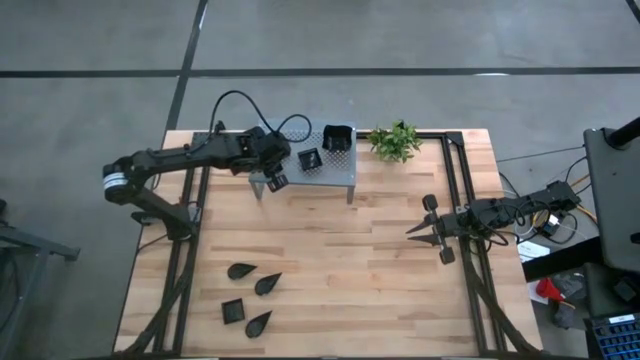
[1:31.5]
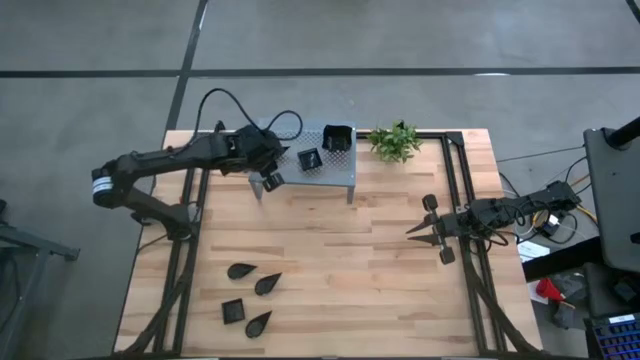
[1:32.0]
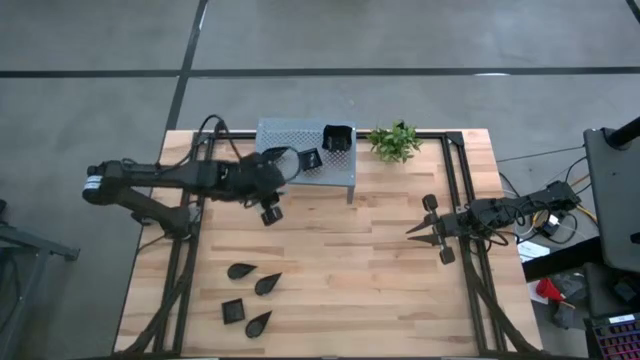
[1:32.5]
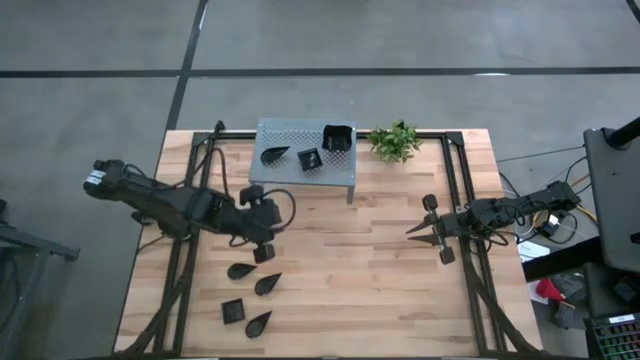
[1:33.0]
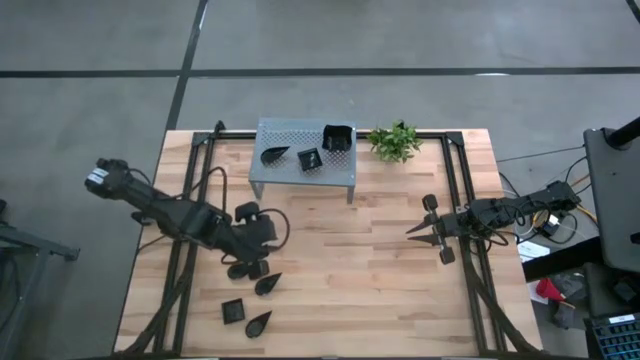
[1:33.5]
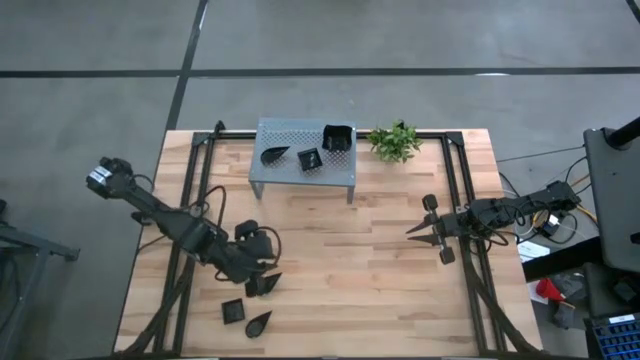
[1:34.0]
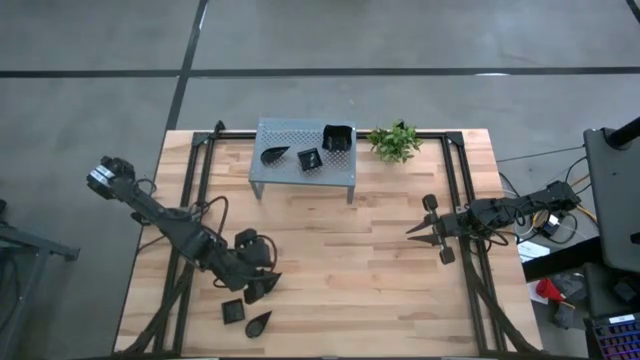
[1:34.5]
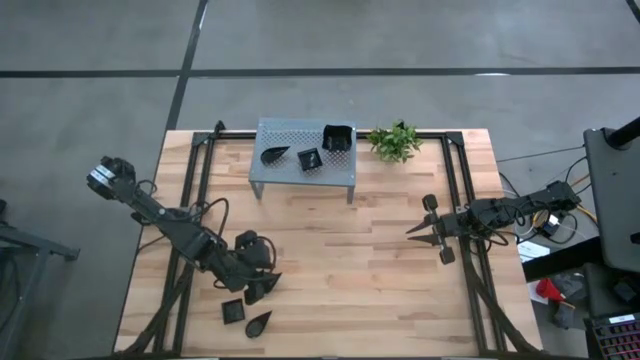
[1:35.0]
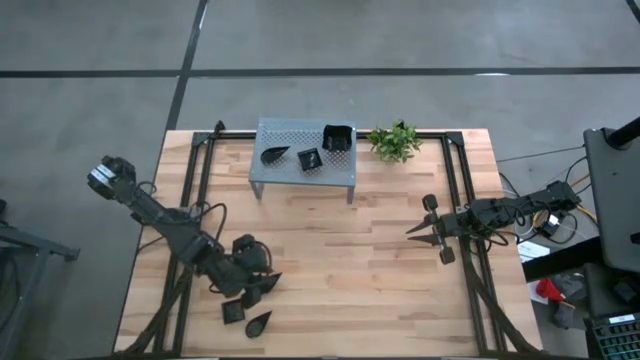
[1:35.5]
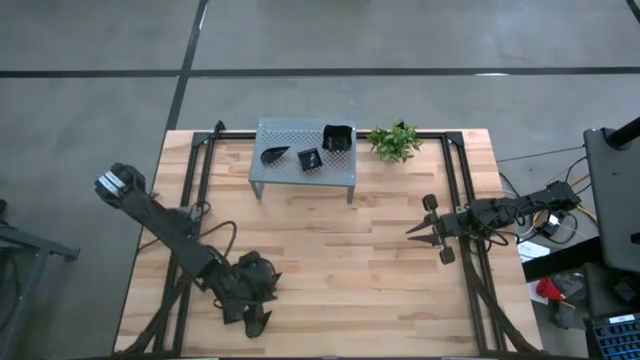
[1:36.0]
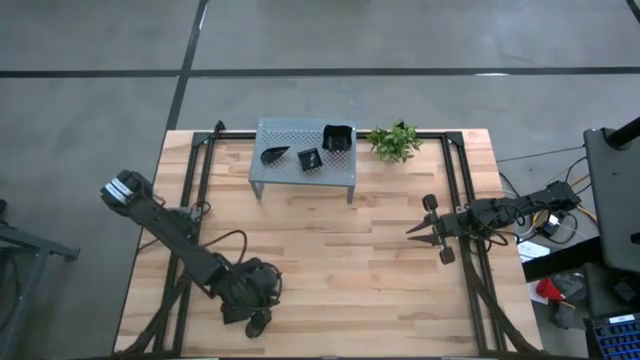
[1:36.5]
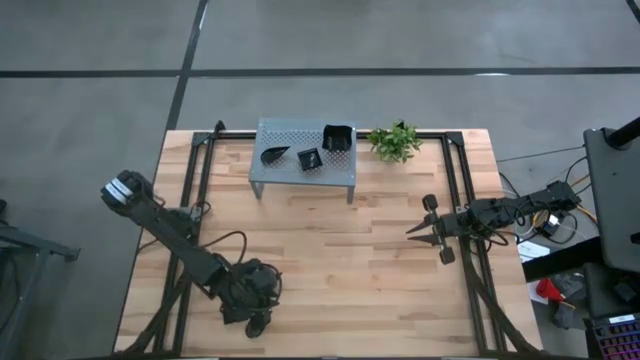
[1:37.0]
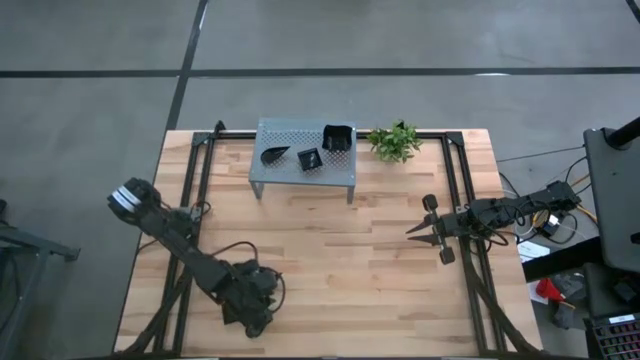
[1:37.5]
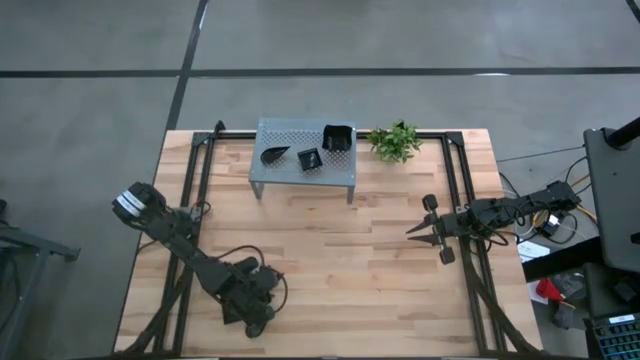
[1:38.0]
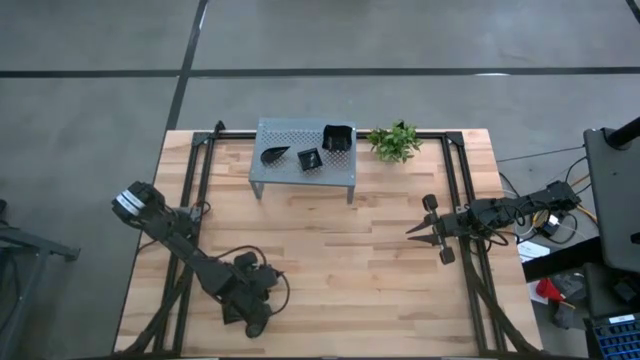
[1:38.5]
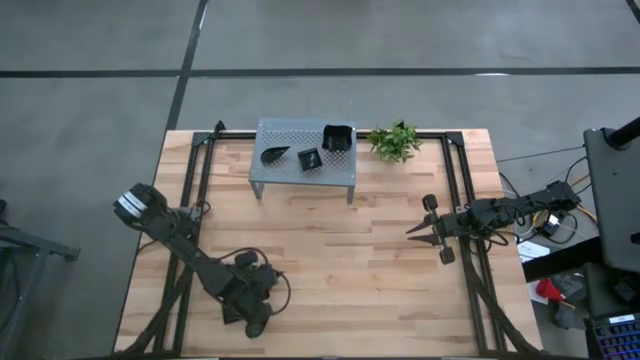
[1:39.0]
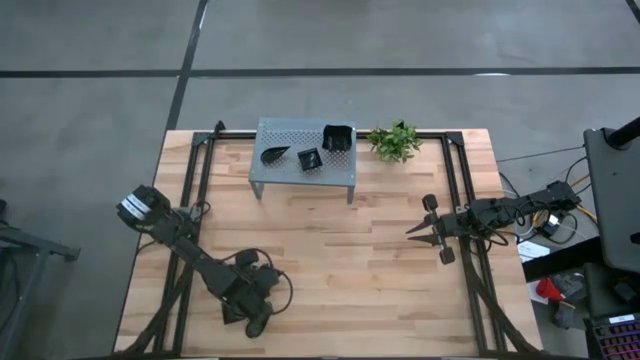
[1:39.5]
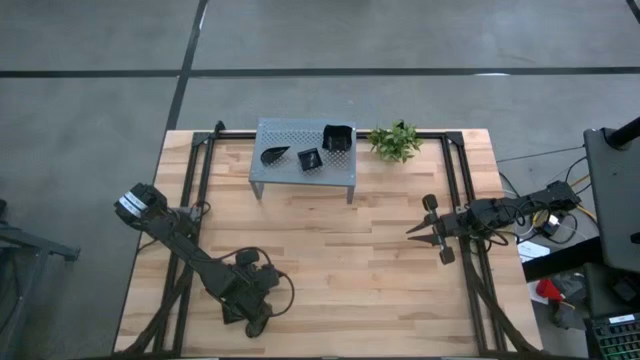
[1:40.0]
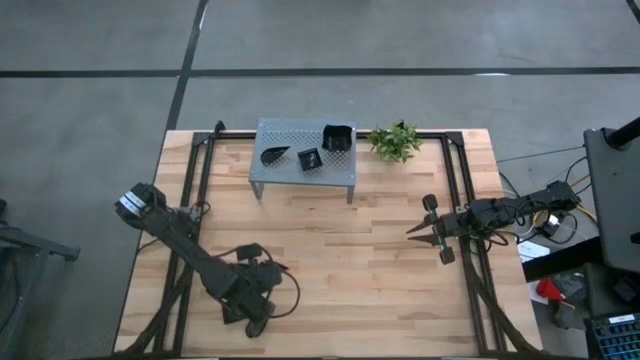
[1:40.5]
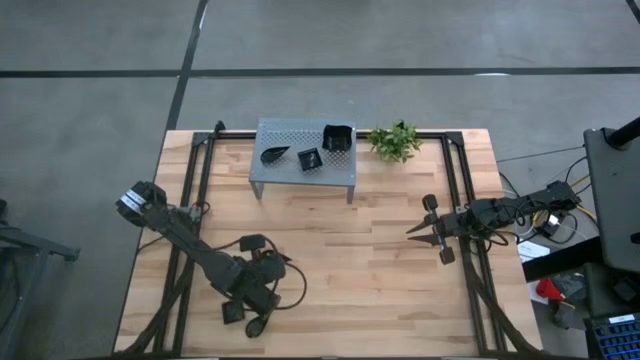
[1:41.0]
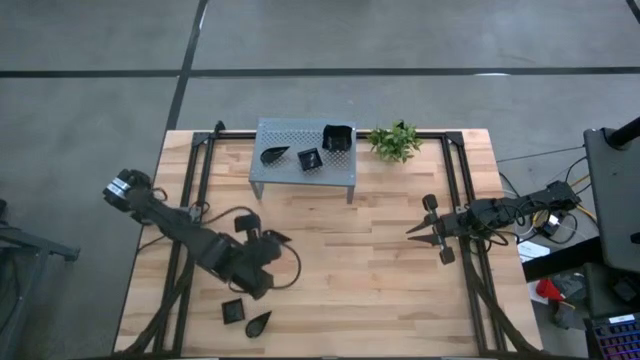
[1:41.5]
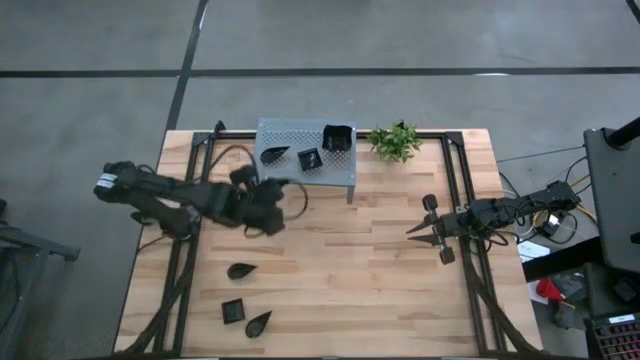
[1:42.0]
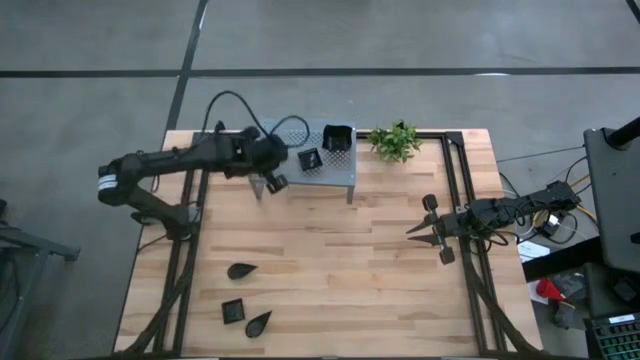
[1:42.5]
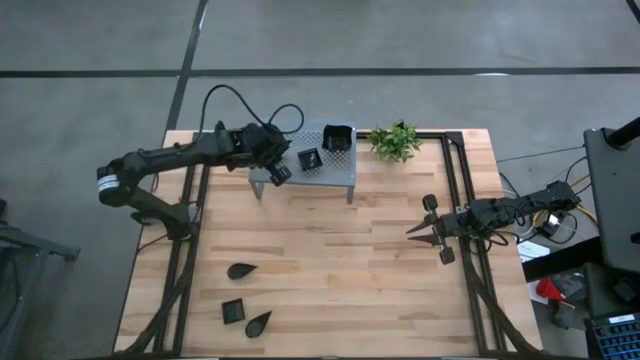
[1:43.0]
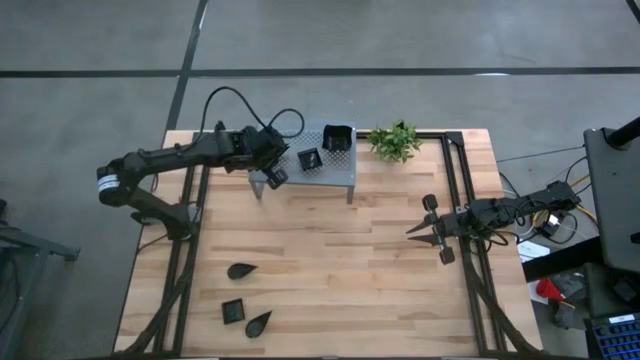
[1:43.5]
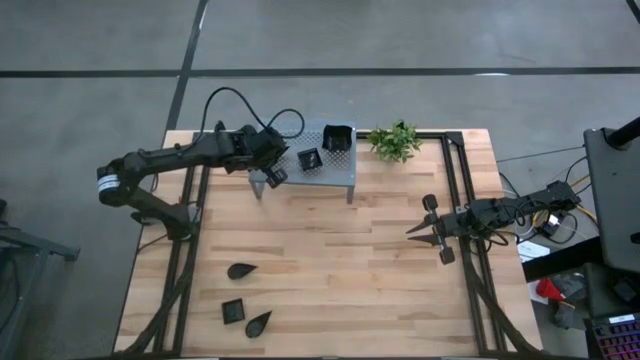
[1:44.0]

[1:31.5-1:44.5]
Task: Pick & Place Mini shaped plates
Stack the black drop-shaped plate on top of the black drop-shaped plate on the shelf

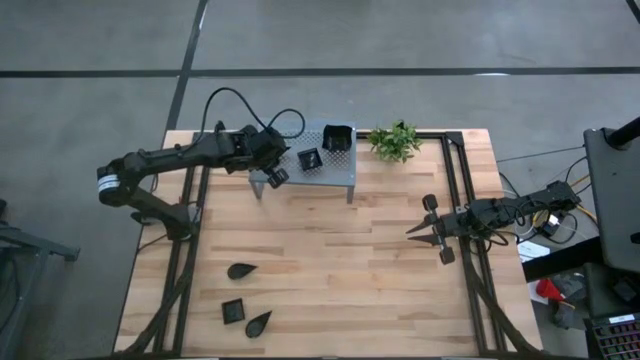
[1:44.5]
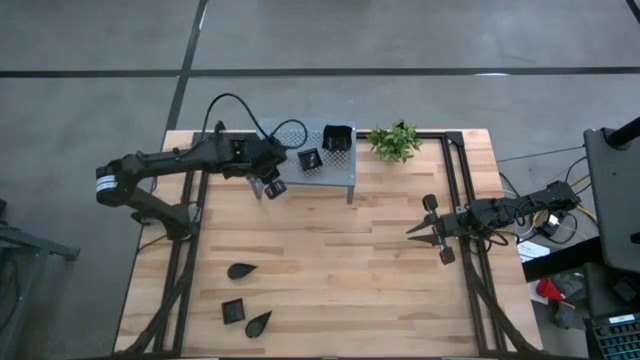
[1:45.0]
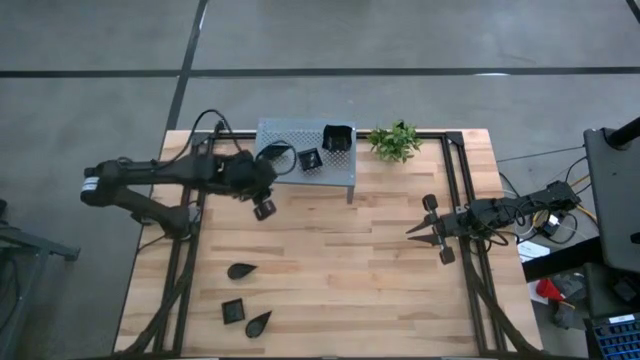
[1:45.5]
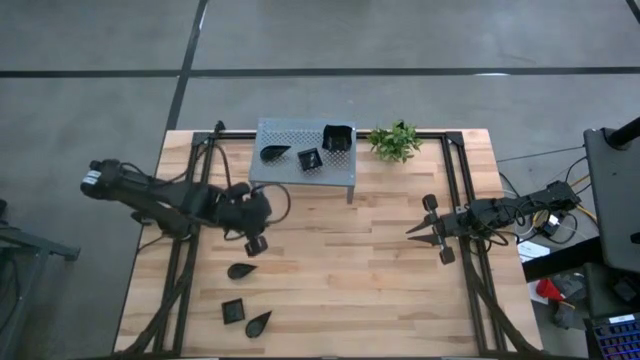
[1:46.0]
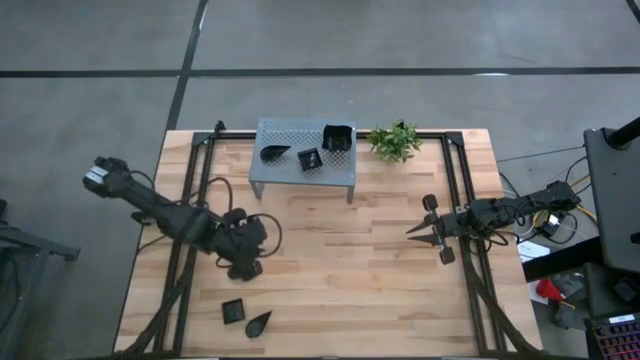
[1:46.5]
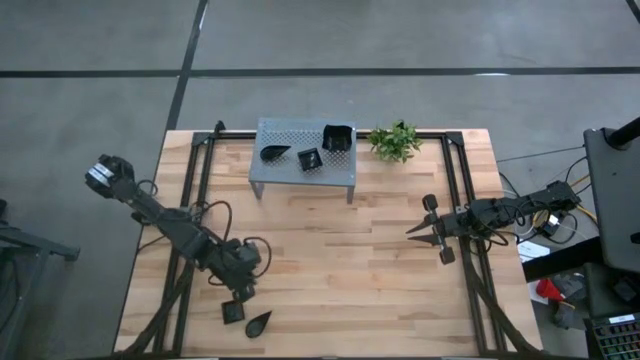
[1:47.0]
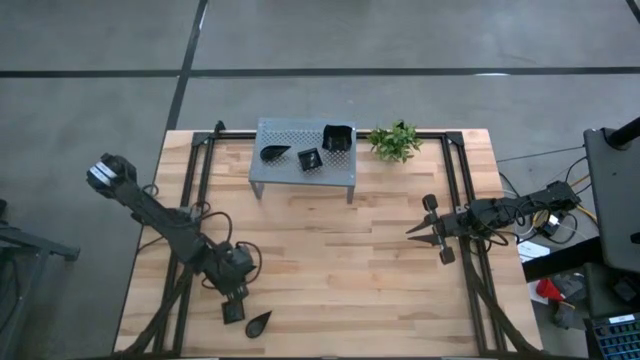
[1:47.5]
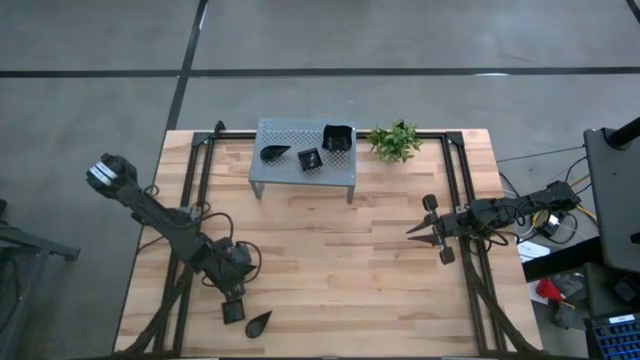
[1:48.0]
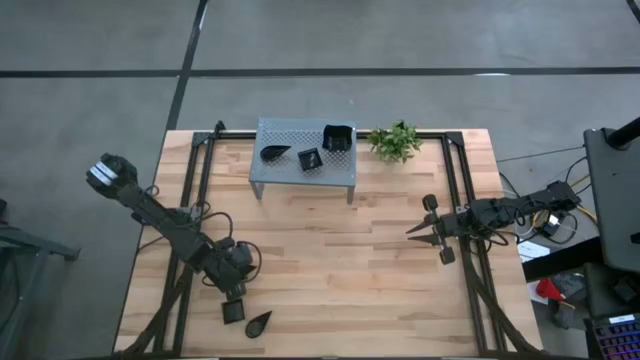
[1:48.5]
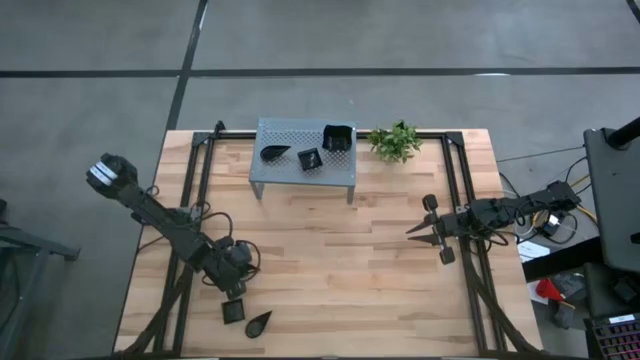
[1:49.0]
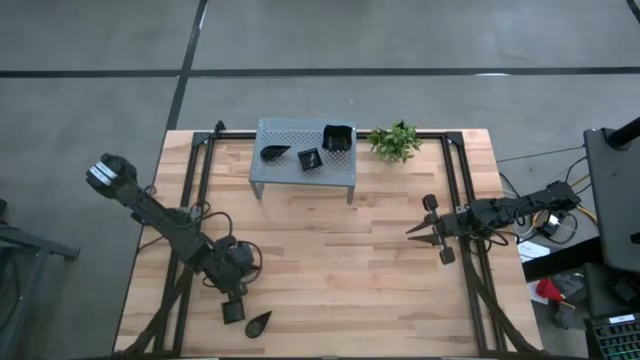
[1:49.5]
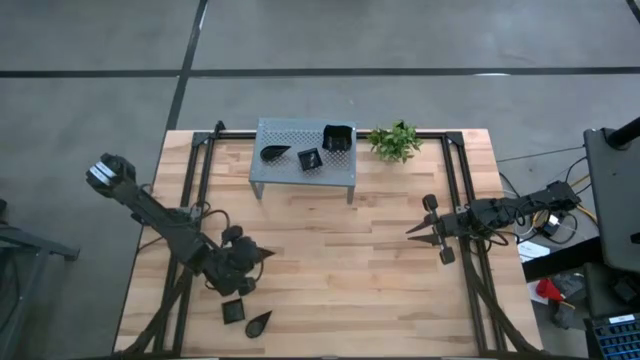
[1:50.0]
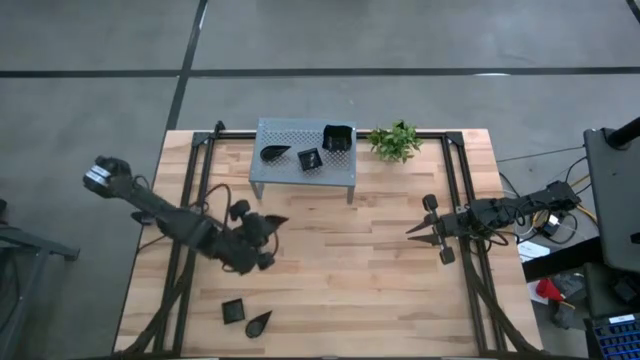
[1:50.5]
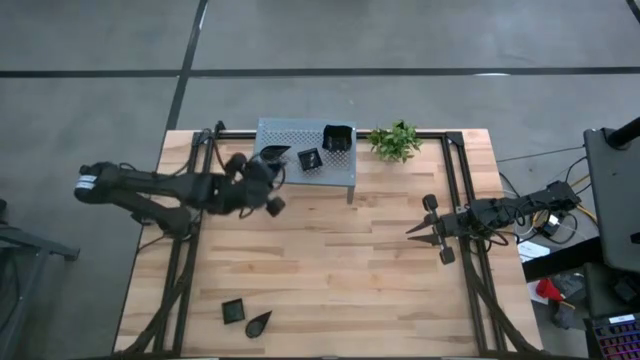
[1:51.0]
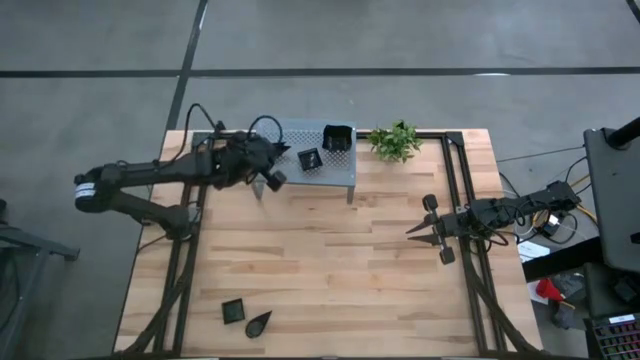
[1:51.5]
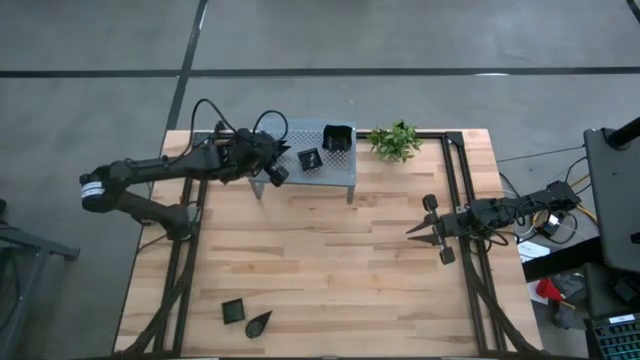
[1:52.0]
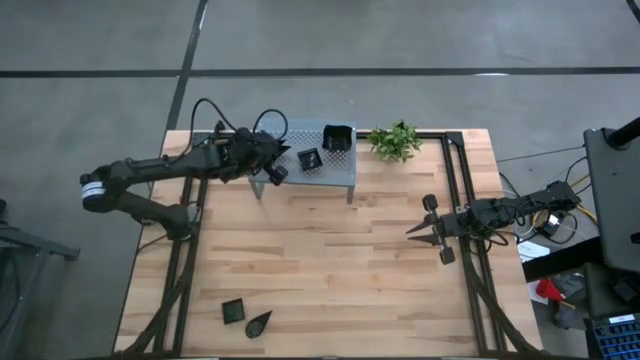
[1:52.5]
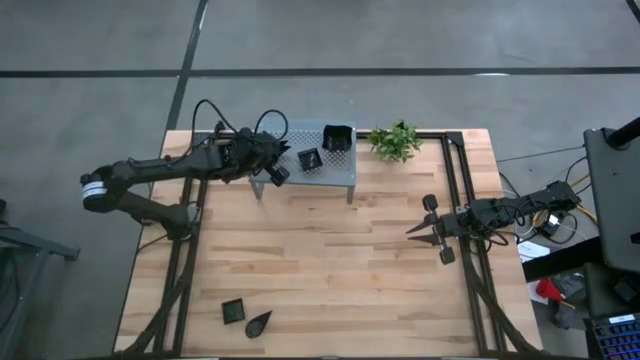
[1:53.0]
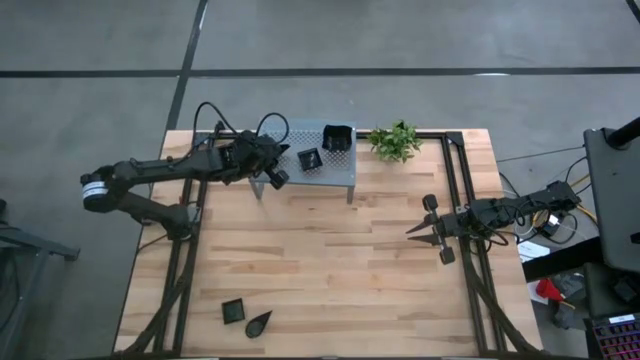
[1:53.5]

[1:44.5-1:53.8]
Stack the black drop-shaped plate on top of the black drop-shaped plates on the shelf
